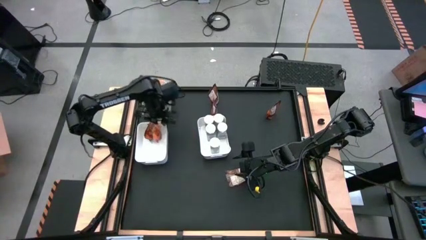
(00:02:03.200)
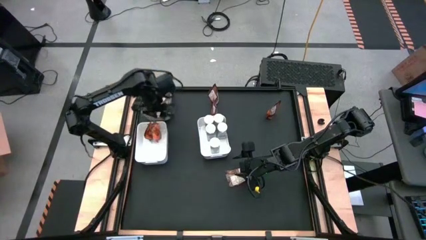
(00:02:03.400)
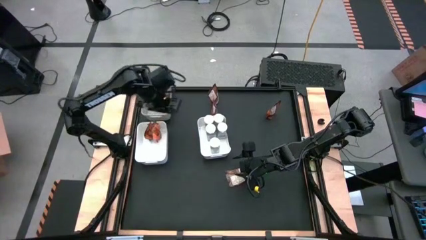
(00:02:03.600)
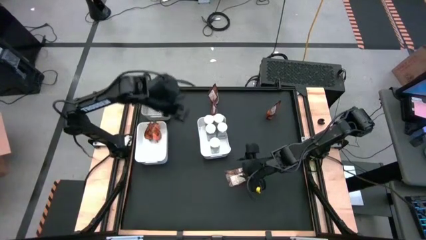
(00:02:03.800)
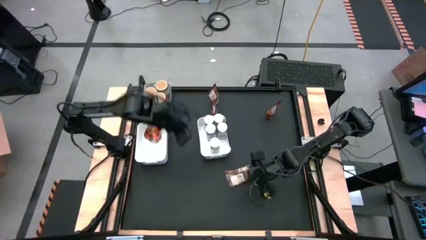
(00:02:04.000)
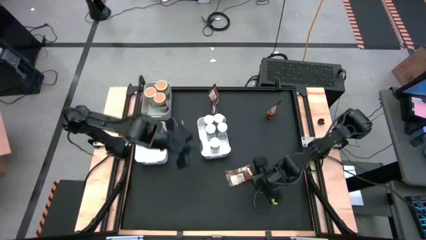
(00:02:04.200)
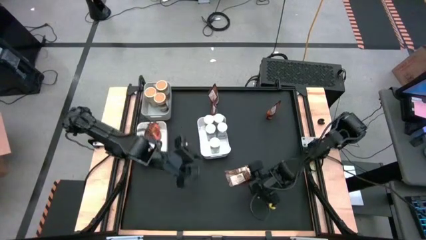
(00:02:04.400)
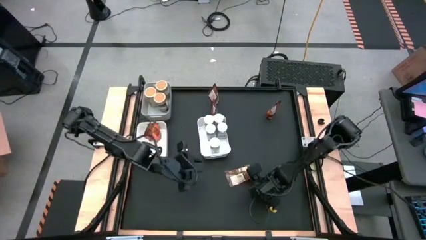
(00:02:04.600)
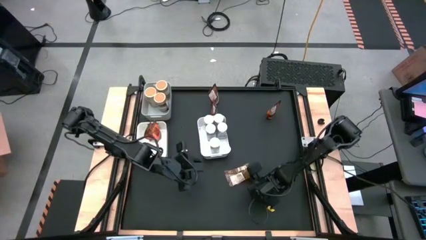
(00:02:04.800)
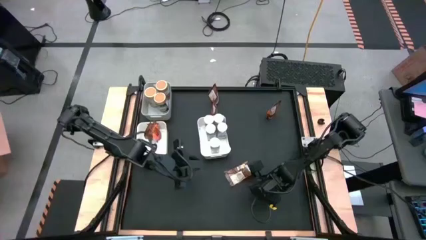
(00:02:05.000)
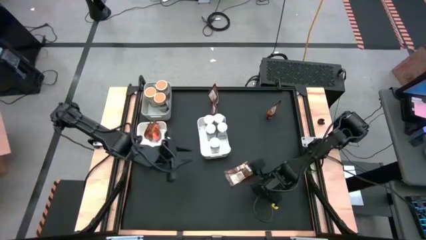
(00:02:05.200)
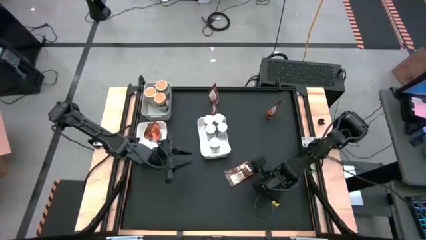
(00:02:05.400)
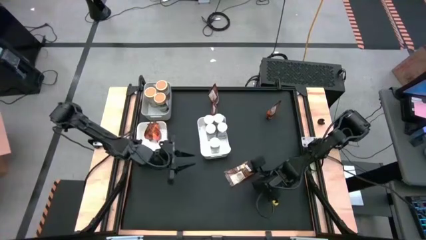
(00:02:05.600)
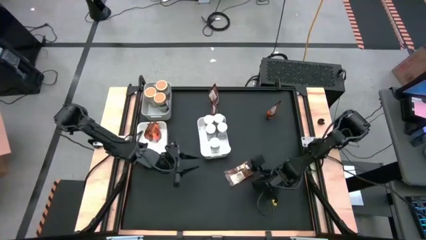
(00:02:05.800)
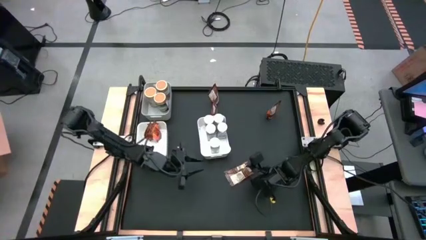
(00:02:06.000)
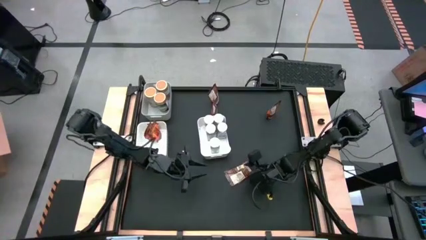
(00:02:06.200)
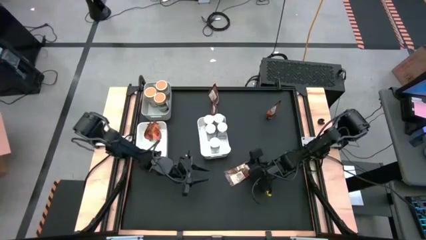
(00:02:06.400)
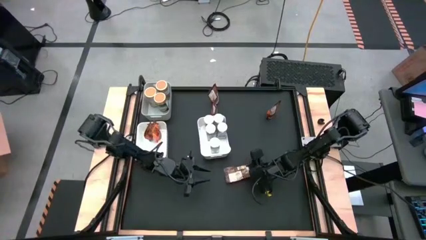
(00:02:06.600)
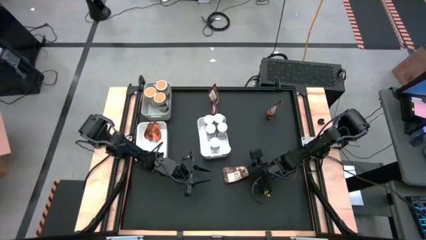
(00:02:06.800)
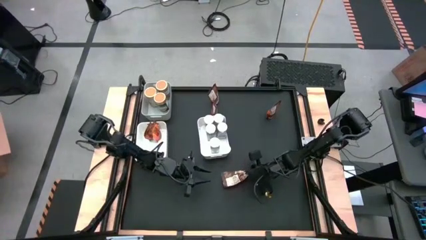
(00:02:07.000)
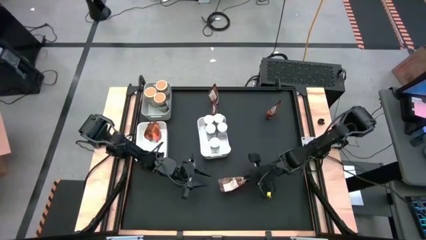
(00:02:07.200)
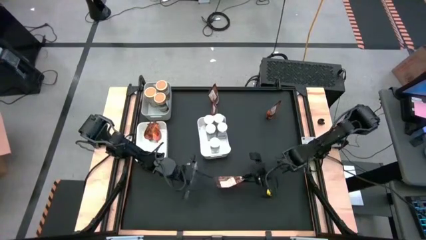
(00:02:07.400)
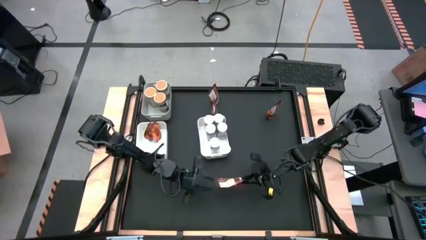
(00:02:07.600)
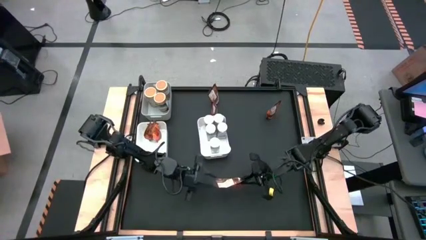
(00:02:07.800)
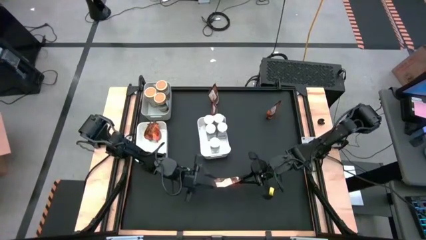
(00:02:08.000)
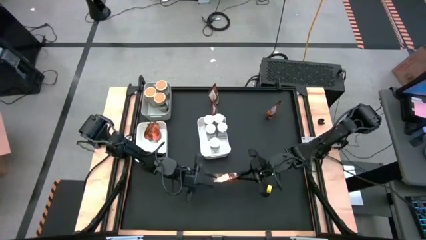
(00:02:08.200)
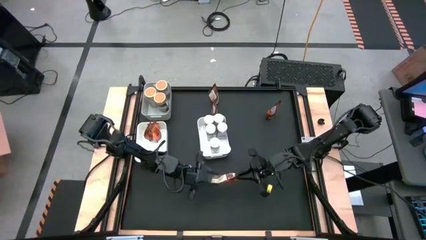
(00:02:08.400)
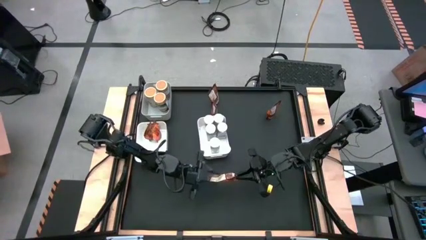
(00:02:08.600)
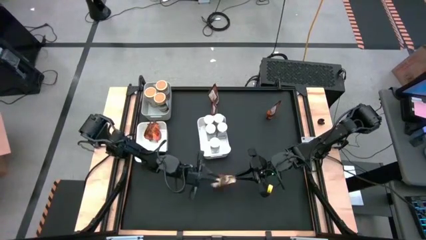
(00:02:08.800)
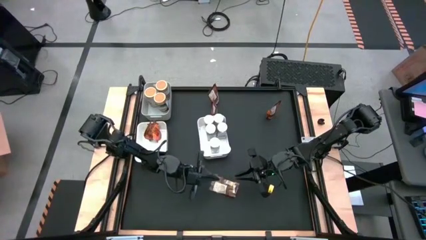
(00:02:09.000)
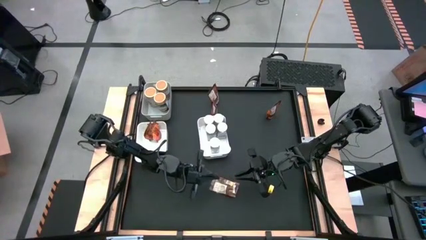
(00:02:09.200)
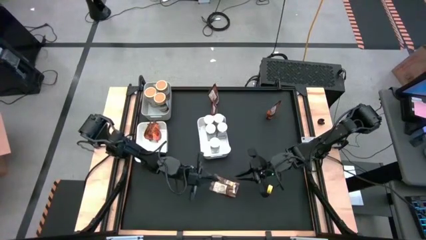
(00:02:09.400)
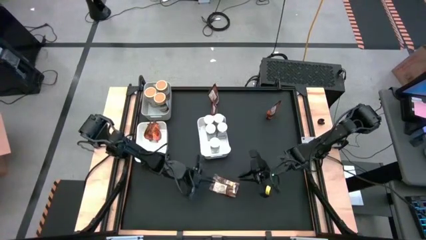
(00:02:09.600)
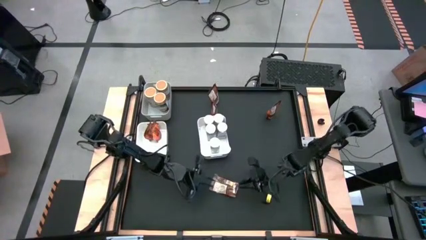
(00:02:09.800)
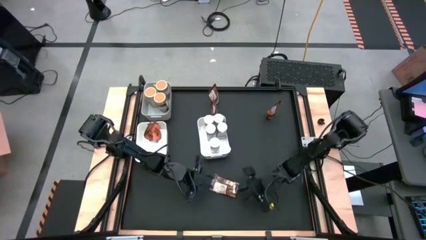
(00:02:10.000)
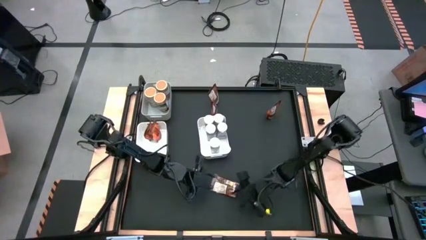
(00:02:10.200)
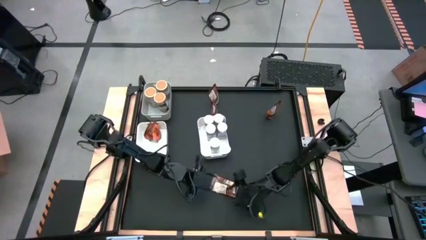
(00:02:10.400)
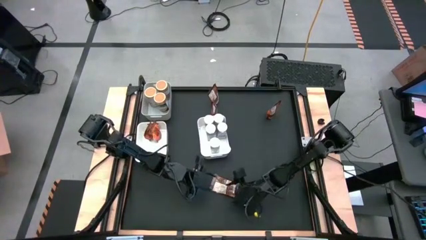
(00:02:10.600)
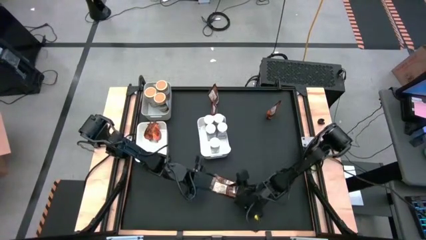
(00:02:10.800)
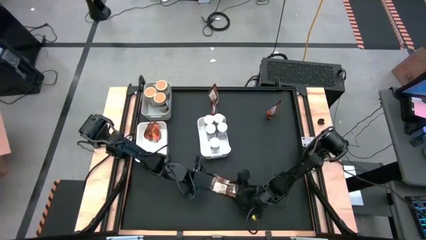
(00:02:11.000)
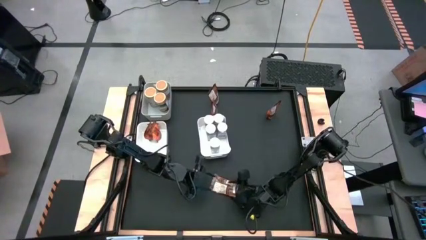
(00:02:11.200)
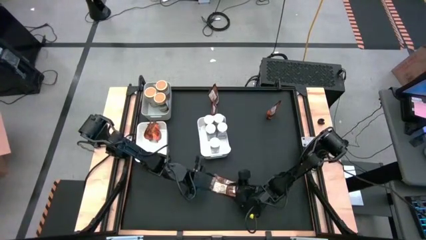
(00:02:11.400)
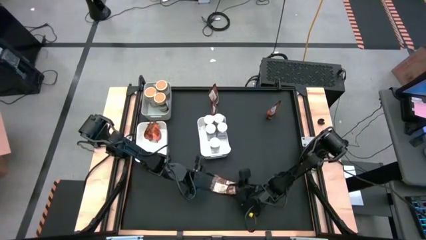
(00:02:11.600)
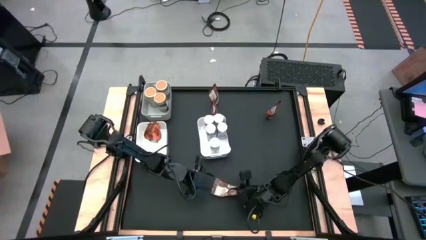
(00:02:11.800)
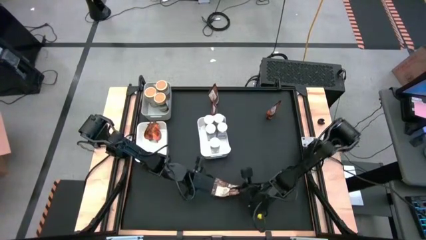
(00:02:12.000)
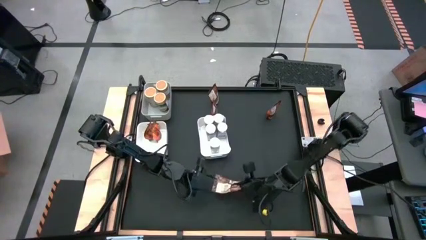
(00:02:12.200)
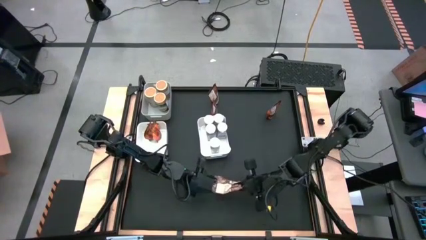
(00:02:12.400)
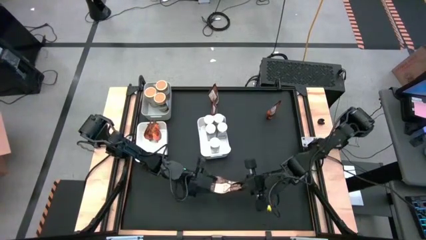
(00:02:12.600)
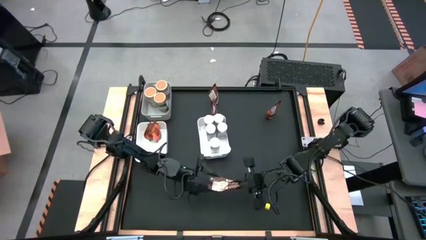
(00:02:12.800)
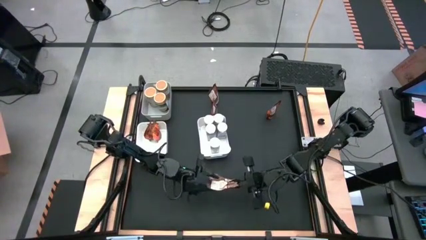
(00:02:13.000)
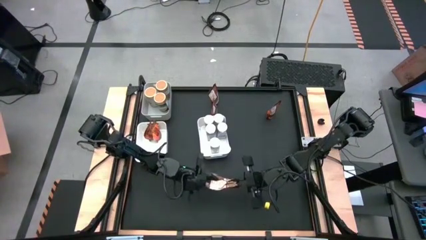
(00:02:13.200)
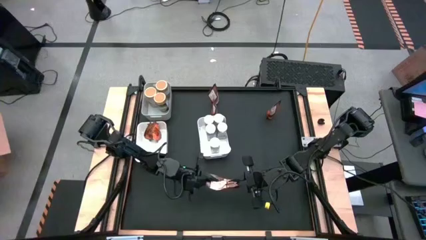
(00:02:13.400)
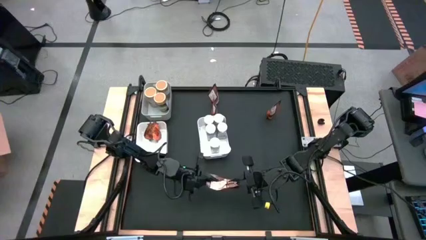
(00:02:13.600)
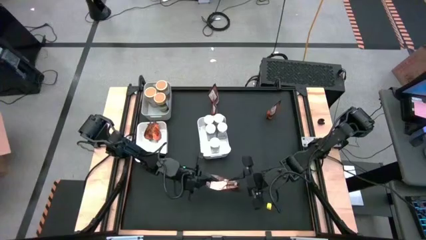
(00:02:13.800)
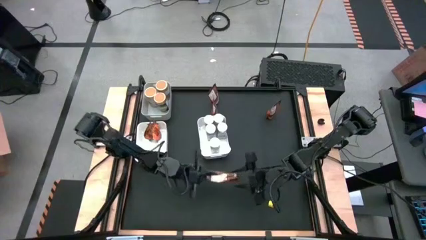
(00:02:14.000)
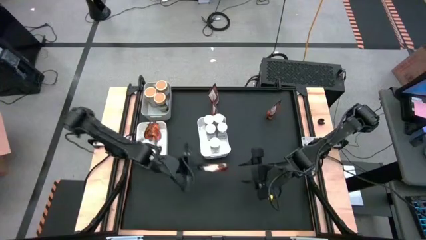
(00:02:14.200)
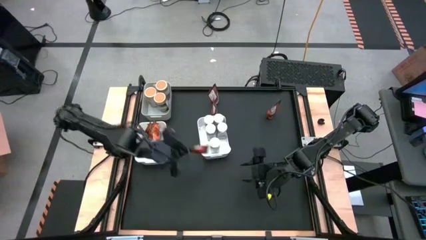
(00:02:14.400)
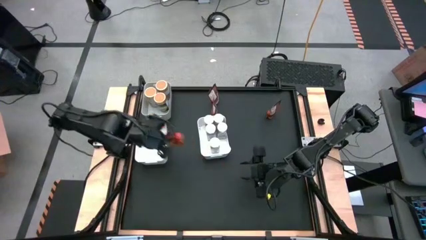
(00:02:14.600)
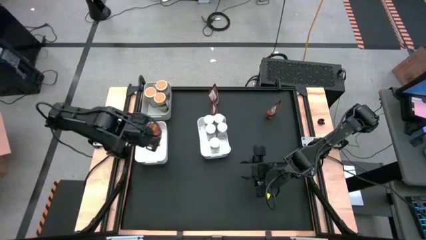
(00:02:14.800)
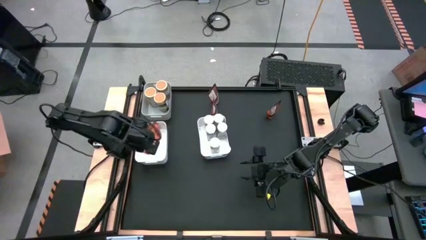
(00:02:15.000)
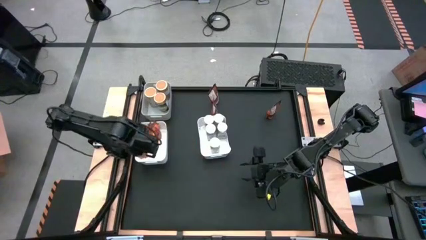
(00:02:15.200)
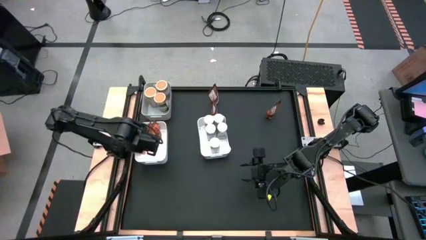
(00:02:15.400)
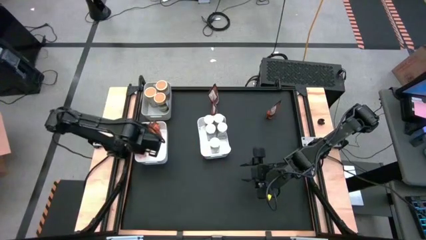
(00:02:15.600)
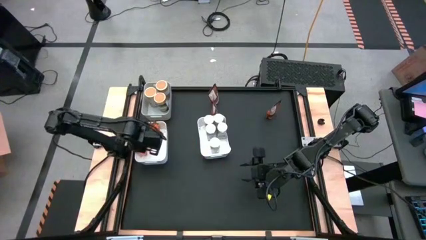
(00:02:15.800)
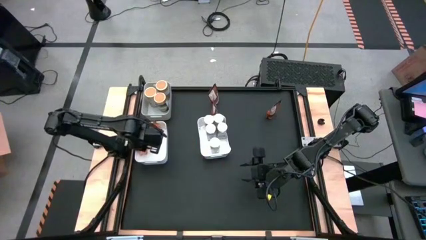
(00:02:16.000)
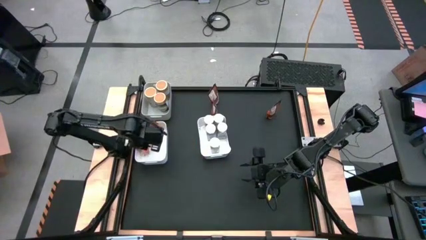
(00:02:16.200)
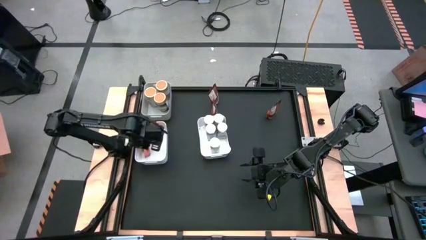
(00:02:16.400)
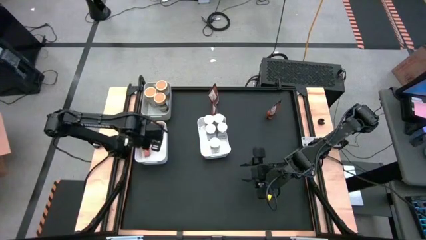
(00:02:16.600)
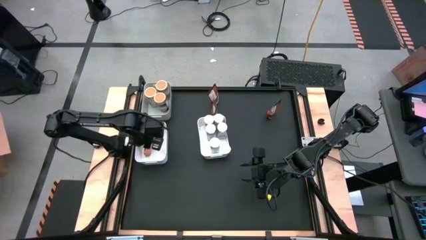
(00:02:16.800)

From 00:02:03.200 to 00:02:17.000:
Task: Sort spices by type
Put the orange seasoning pack into the left white bin
